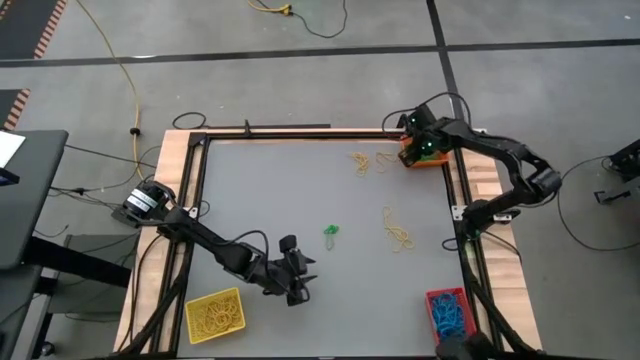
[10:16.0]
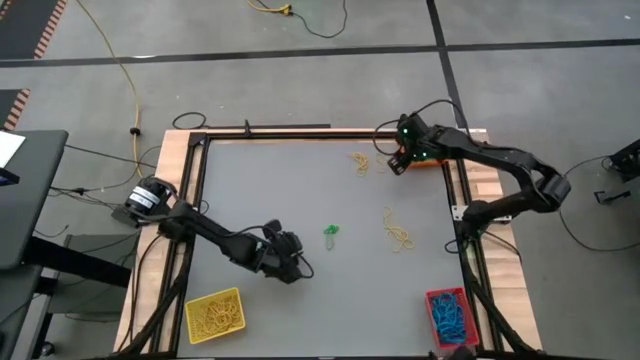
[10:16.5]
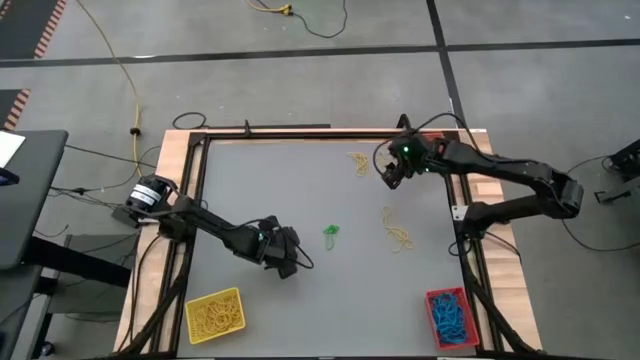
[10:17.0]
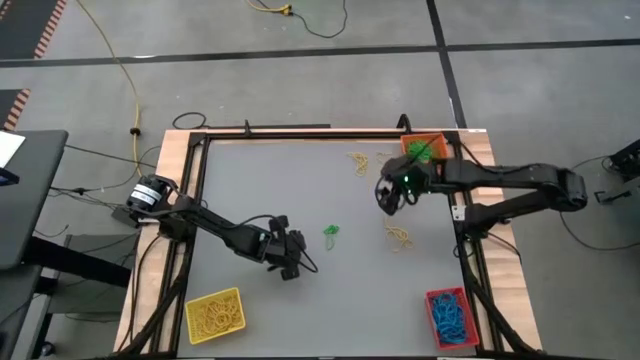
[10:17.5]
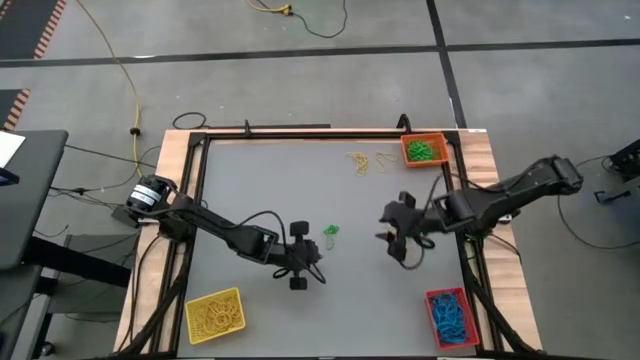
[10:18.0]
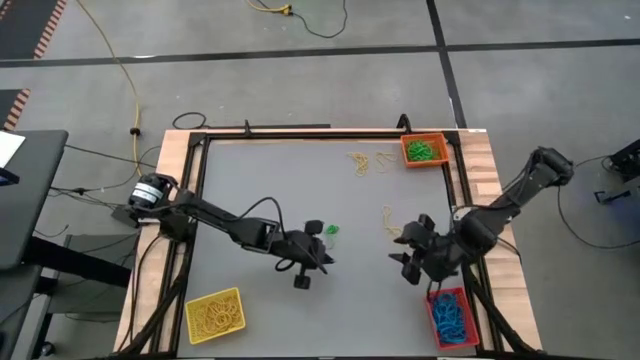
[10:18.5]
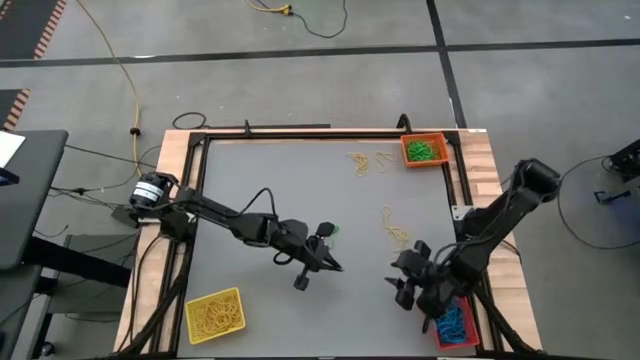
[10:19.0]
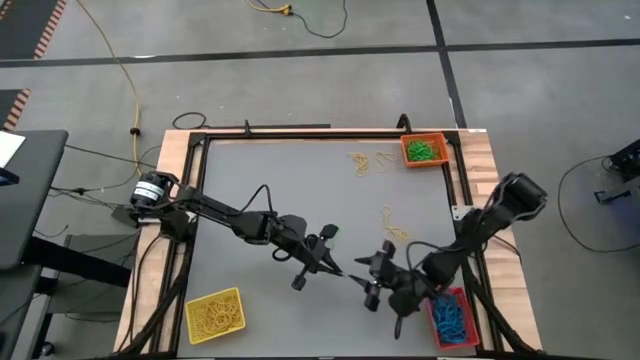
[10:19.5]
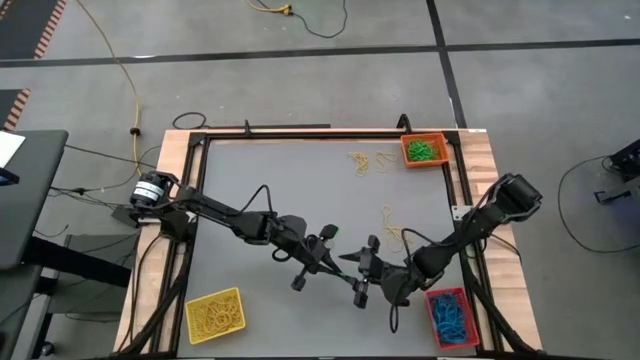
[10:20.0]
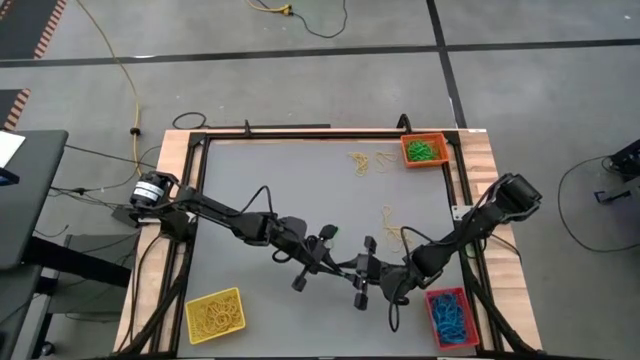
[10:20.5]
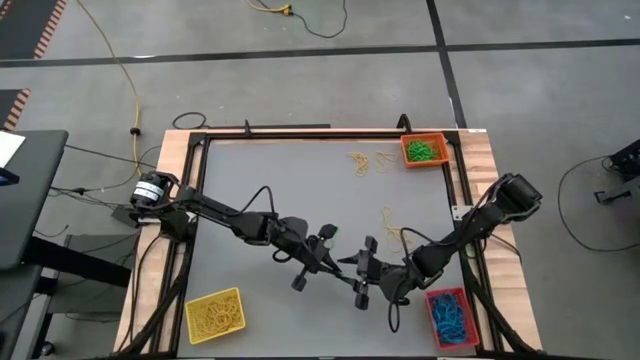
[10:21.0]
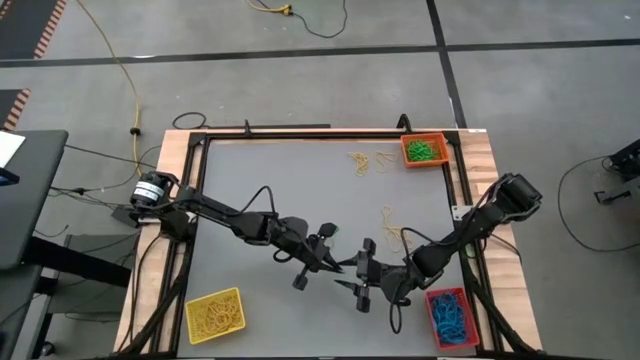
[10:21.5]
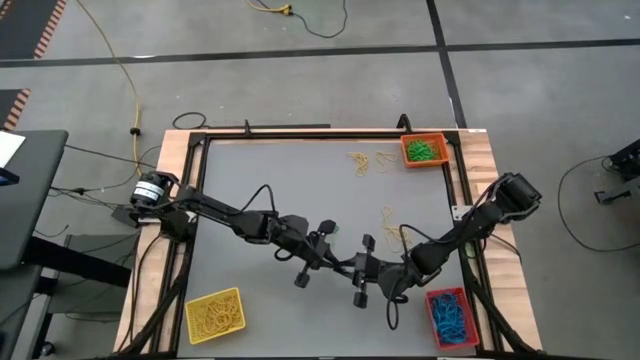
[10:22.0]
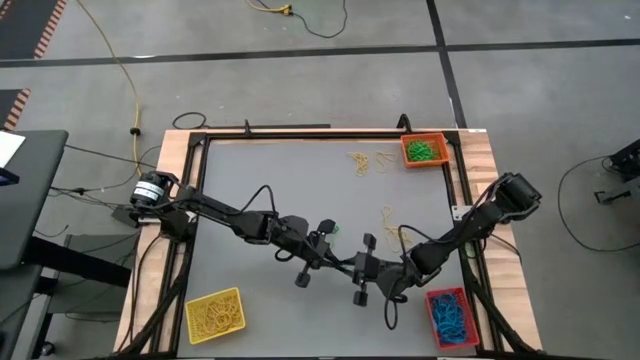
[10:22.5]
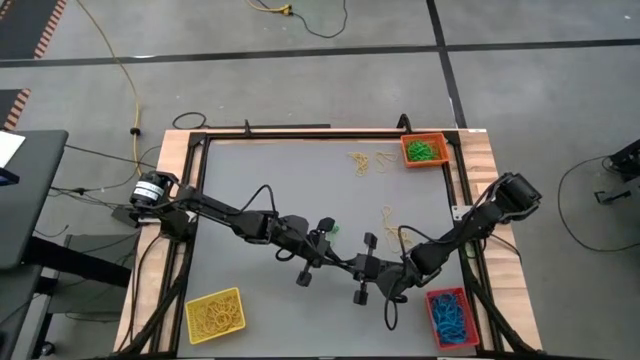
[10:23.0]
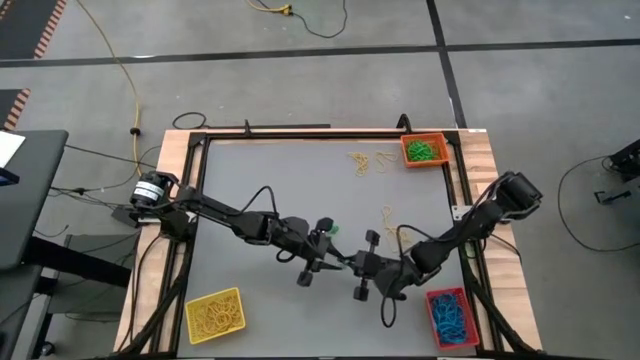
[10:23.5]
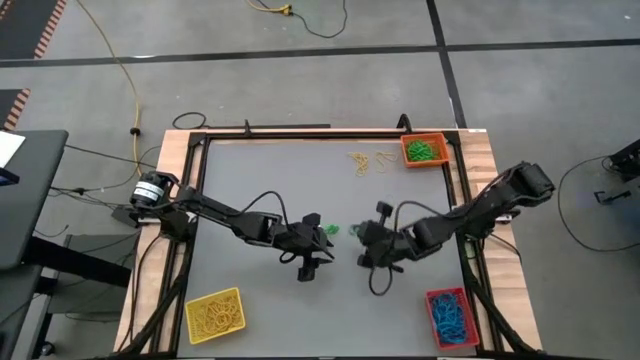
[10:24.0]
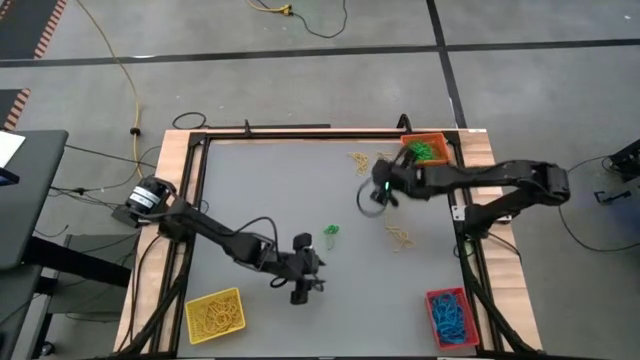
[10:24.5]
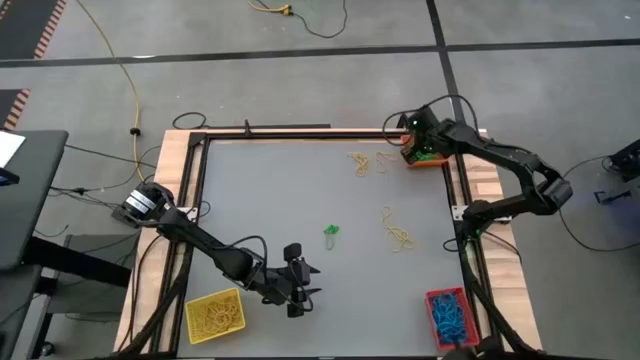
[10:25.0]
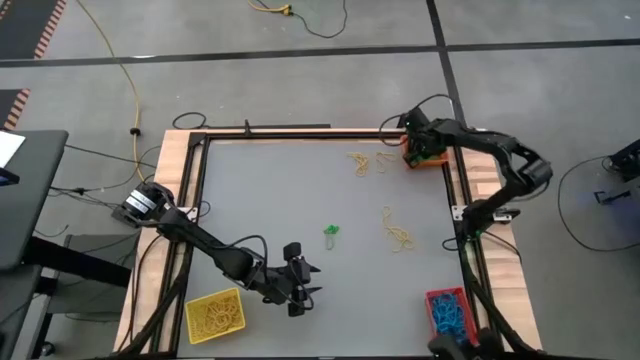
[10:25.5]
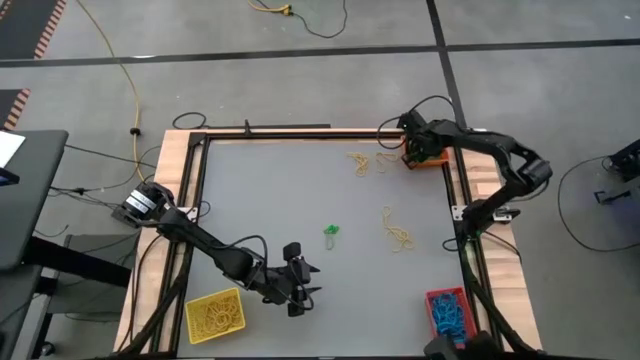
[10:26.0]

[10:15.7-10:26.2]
Task: Sort rubber bands into baskets
Put the green rubber band into the orange bin

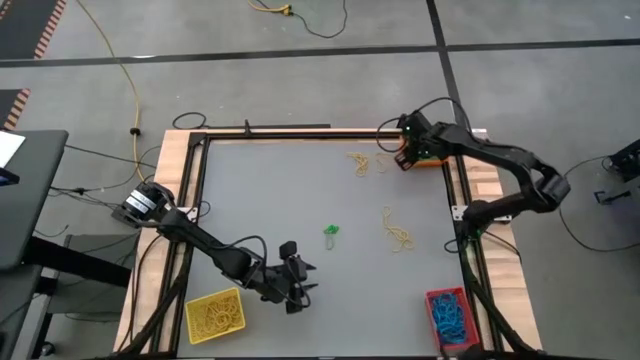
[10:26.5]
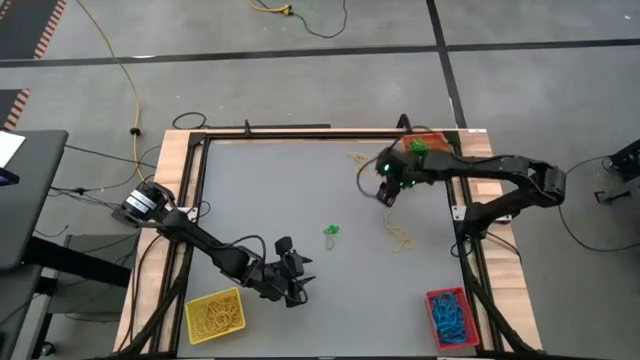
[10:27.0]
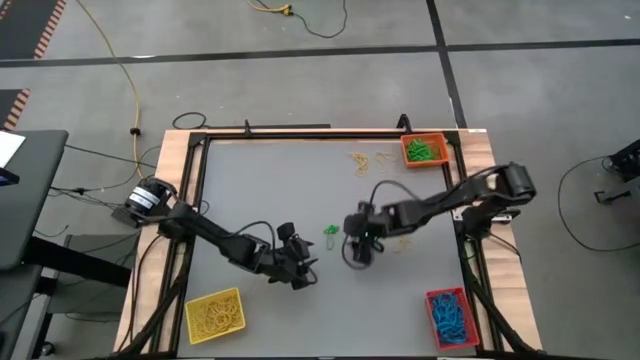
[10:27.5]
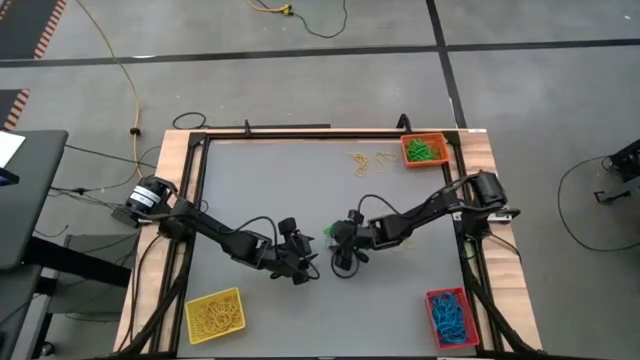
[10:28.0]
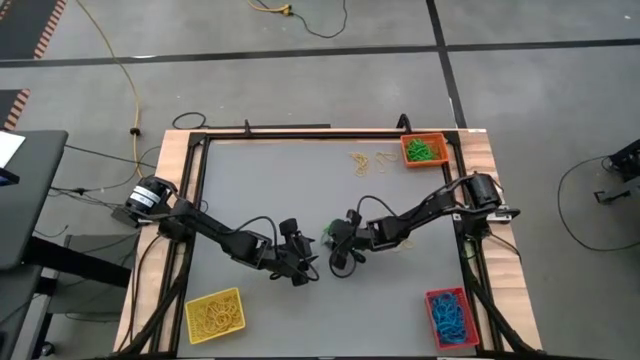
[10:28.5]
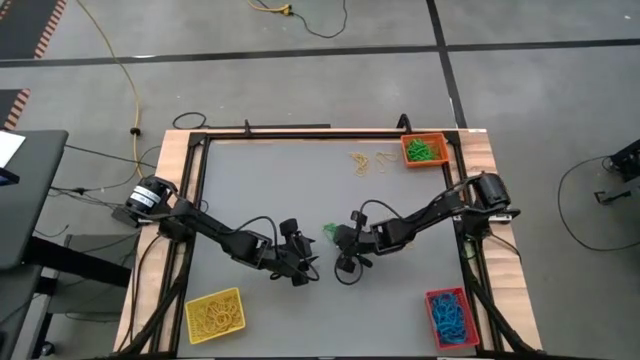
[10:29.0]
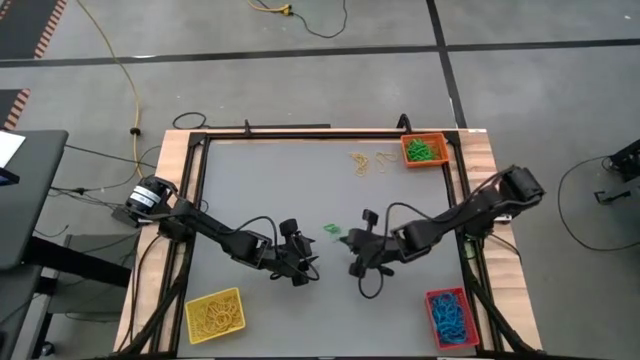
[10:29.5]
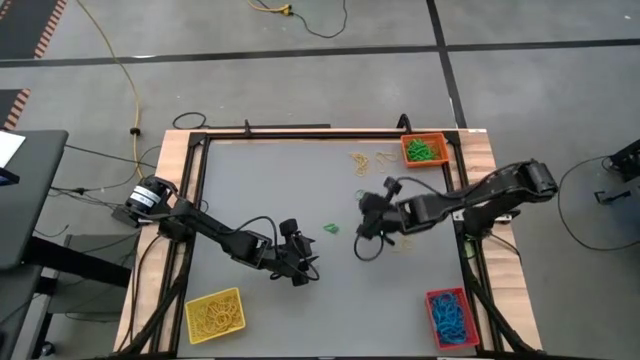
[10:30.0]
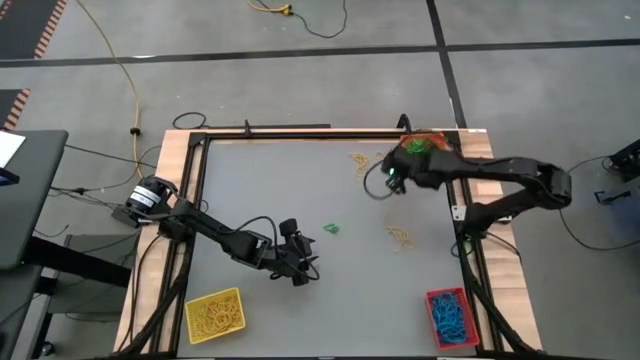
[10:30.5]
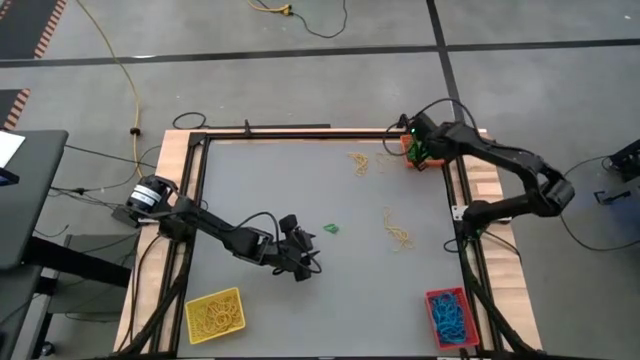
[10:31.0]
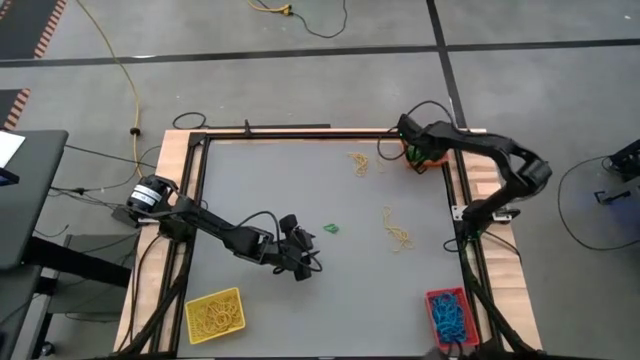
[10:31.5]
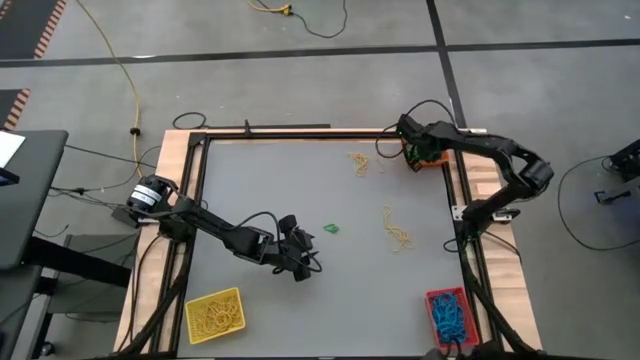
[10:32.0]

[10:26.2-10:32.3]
Put the green rubber band into the orange bin

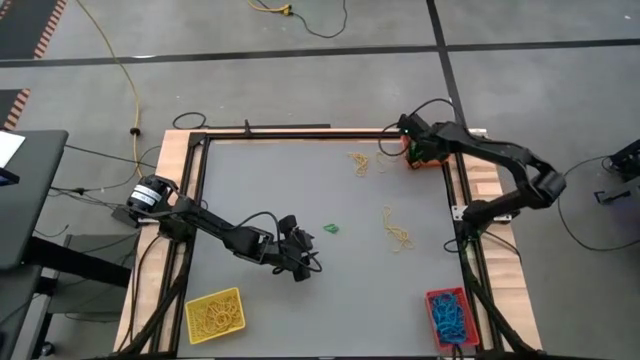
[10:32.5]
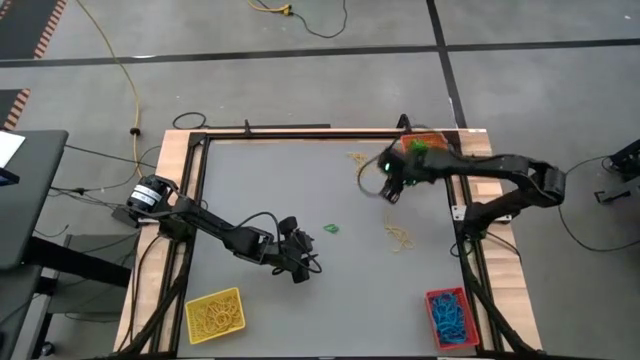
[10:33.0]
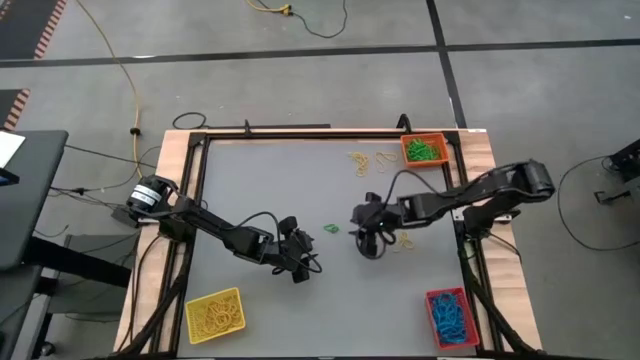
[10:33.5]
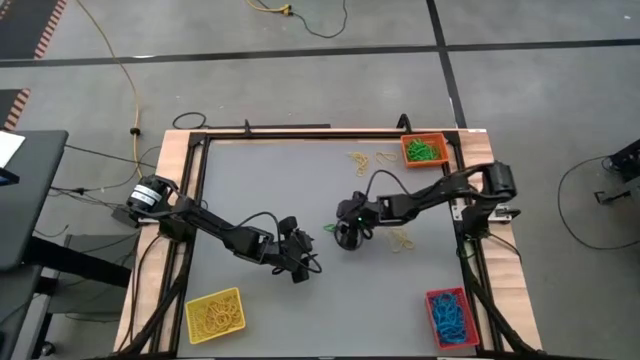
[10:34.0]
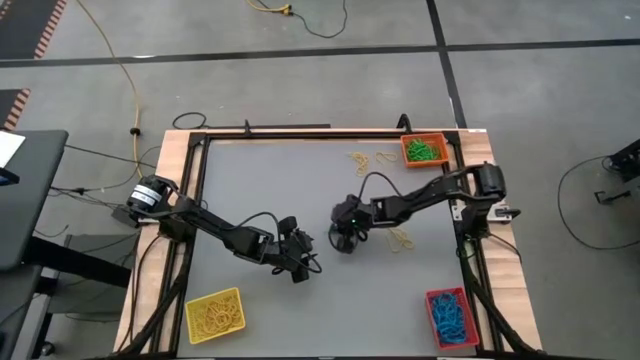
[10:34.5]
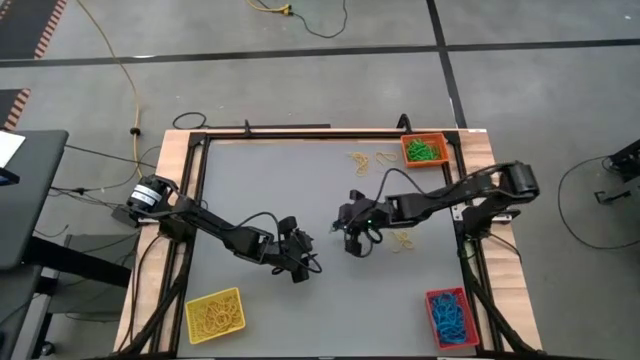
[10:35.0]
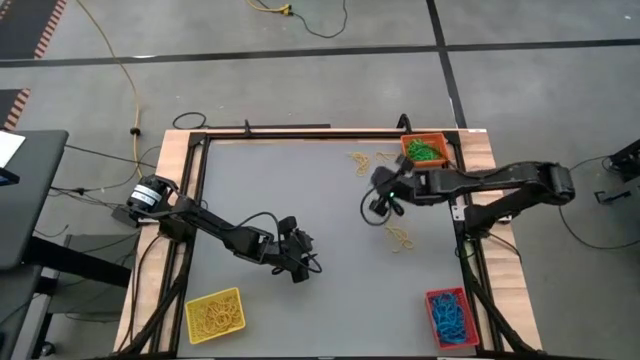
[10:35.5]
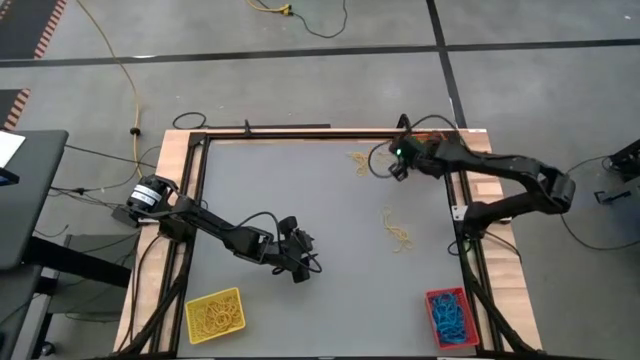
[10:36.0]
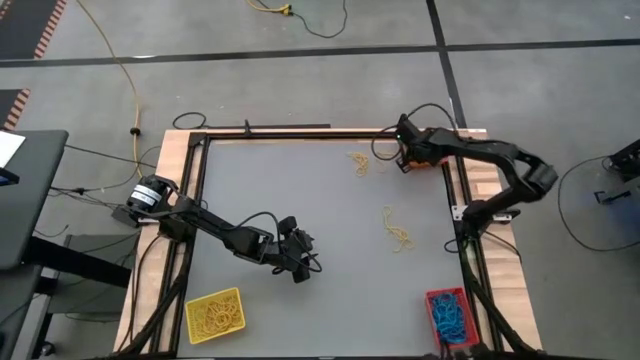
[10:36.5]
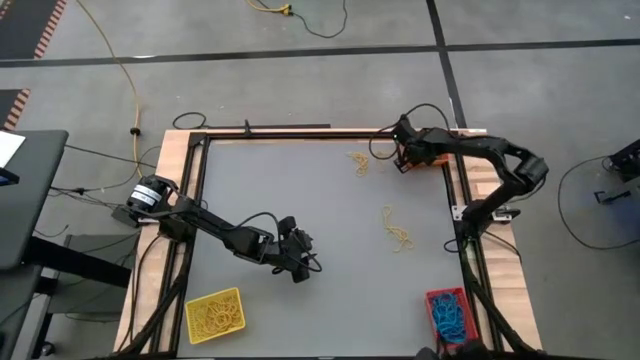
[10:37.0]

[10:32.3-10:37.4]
Put the green rubber band into the orange bin
